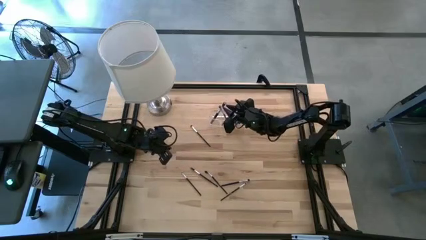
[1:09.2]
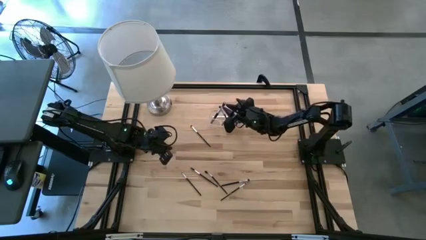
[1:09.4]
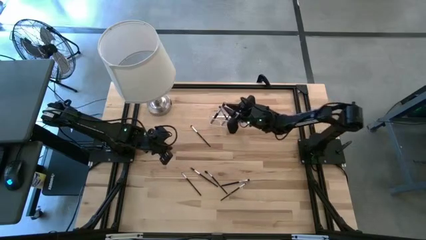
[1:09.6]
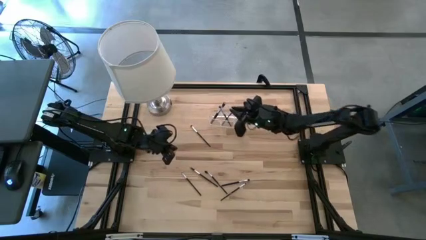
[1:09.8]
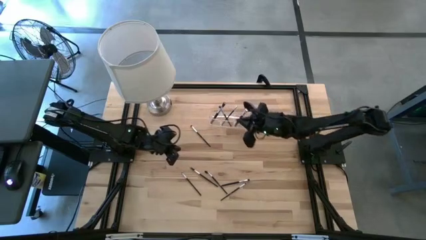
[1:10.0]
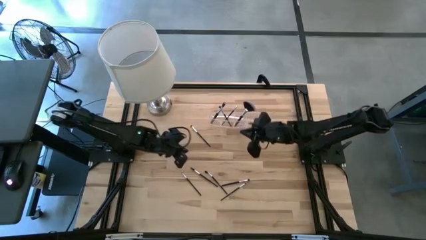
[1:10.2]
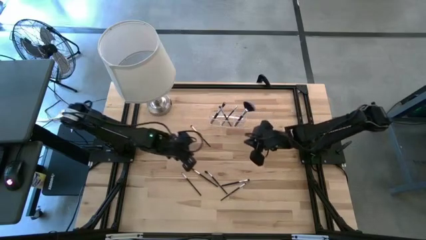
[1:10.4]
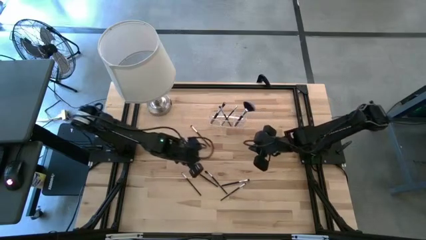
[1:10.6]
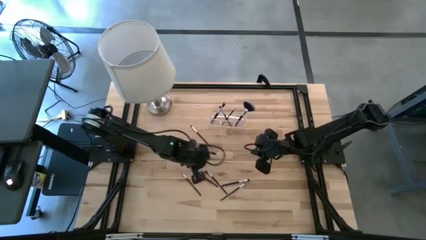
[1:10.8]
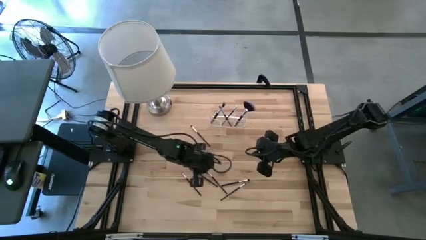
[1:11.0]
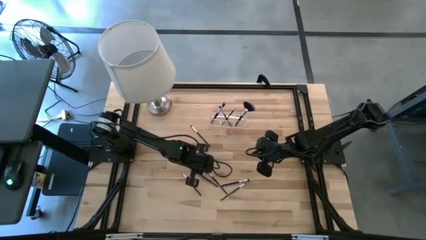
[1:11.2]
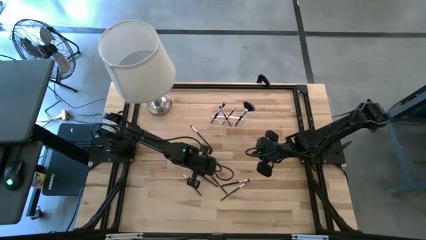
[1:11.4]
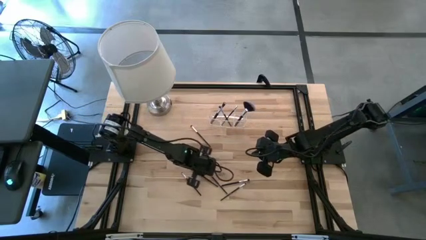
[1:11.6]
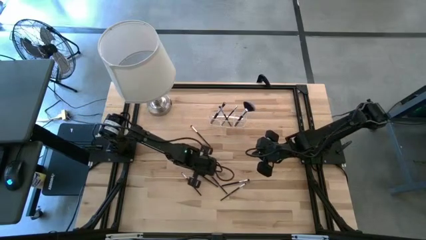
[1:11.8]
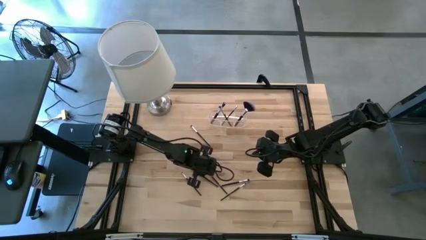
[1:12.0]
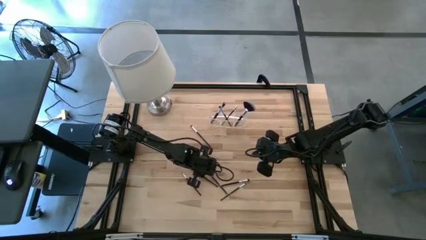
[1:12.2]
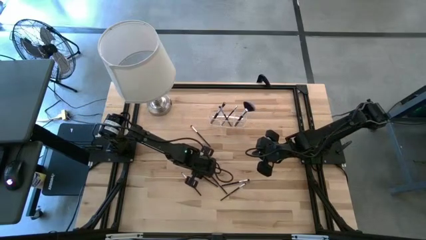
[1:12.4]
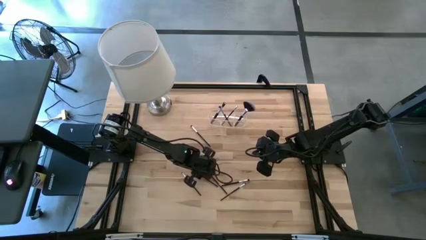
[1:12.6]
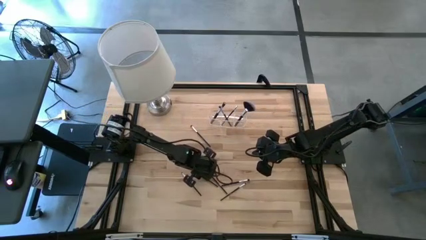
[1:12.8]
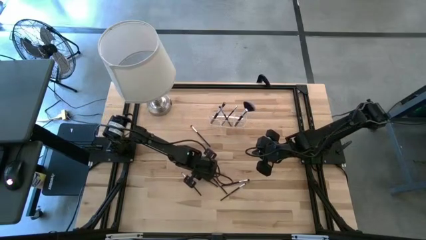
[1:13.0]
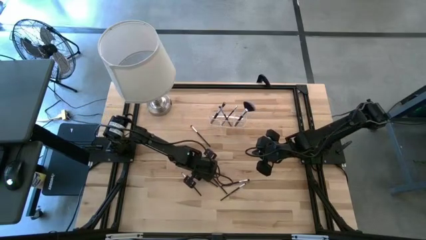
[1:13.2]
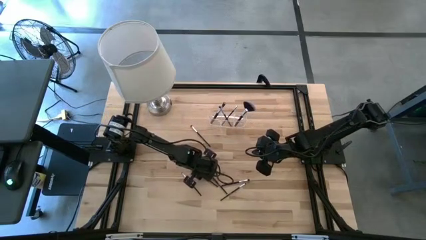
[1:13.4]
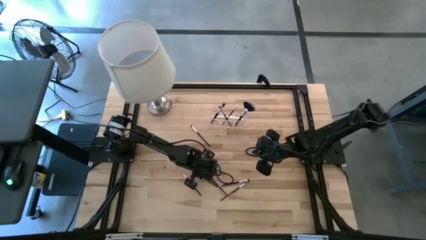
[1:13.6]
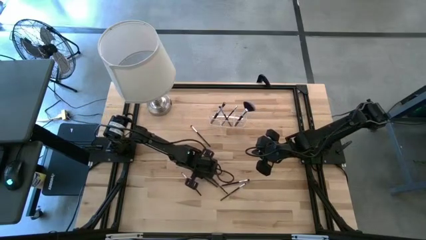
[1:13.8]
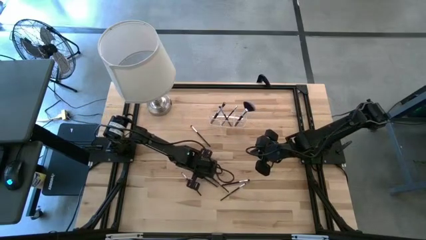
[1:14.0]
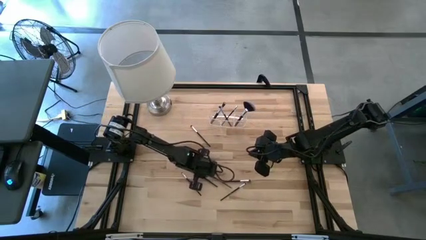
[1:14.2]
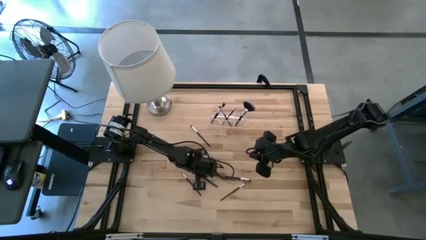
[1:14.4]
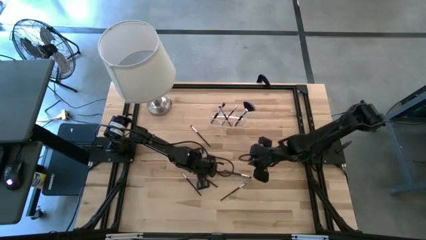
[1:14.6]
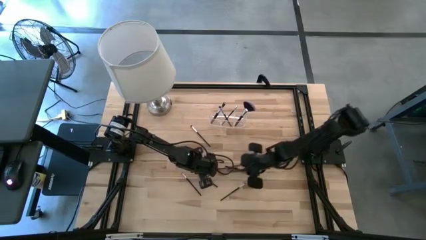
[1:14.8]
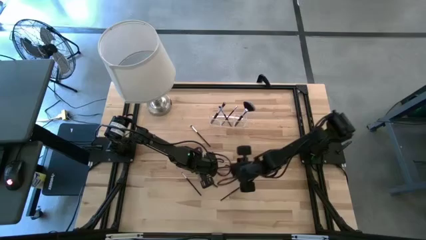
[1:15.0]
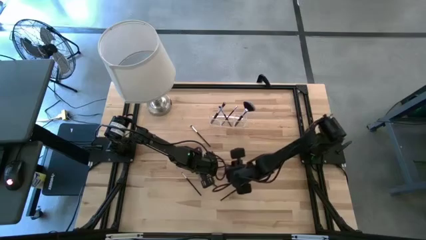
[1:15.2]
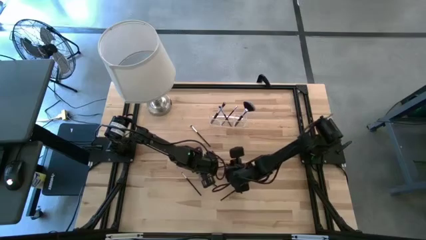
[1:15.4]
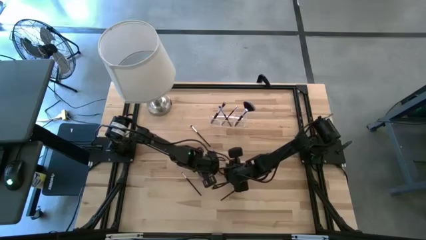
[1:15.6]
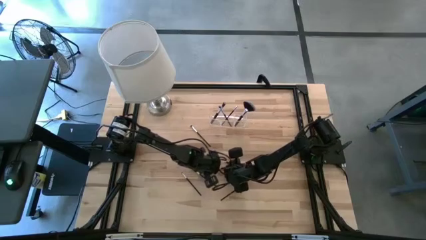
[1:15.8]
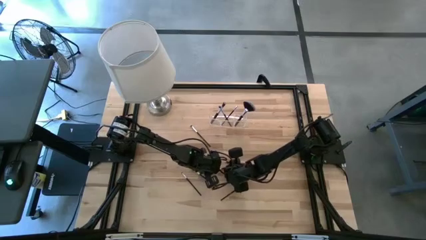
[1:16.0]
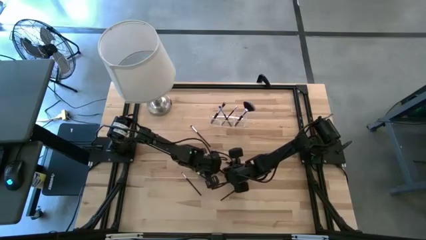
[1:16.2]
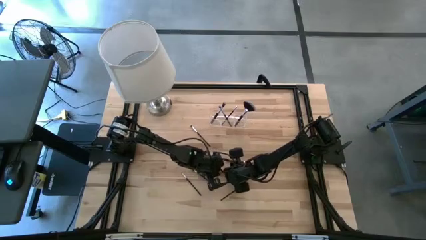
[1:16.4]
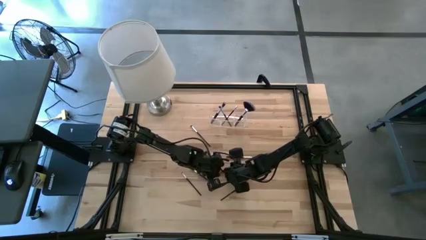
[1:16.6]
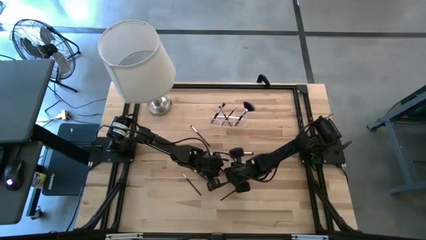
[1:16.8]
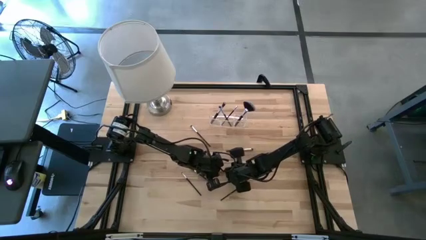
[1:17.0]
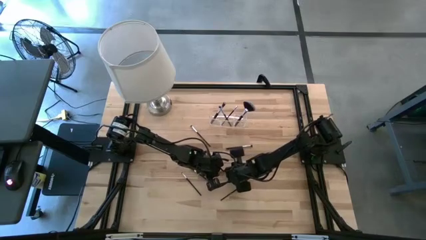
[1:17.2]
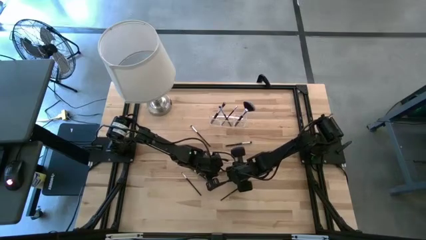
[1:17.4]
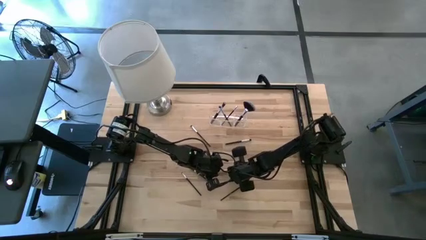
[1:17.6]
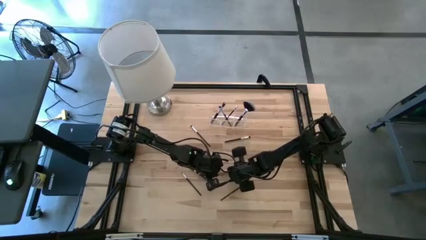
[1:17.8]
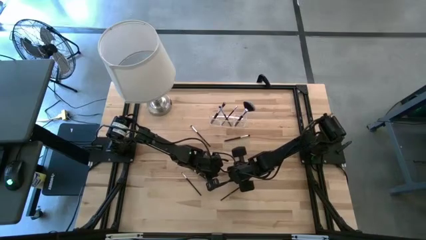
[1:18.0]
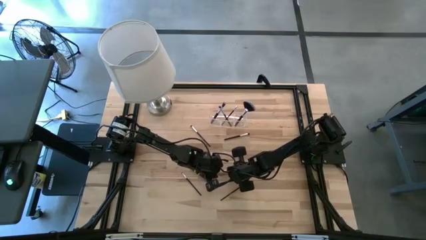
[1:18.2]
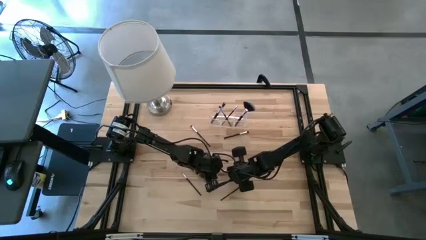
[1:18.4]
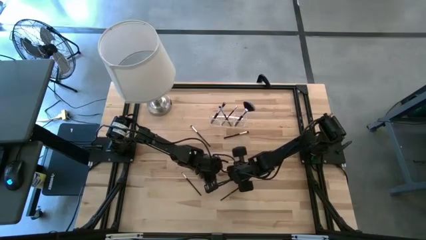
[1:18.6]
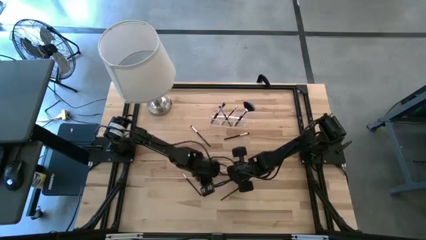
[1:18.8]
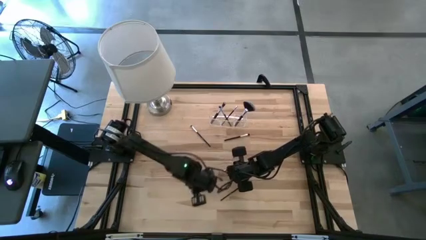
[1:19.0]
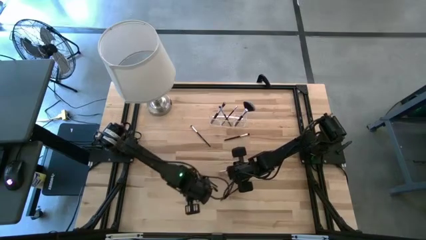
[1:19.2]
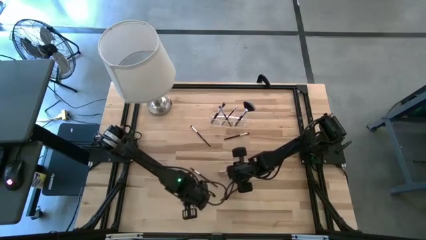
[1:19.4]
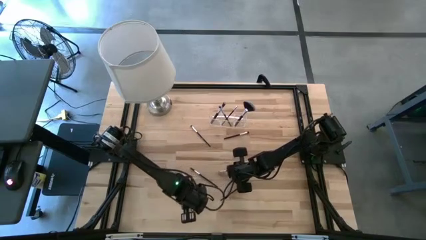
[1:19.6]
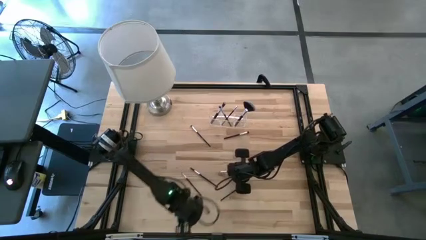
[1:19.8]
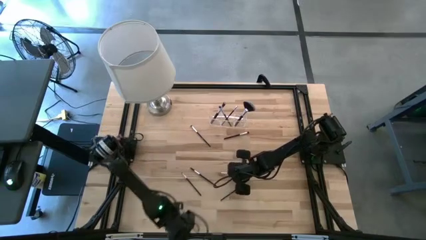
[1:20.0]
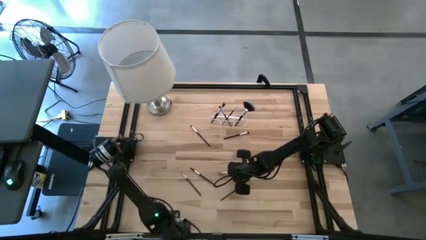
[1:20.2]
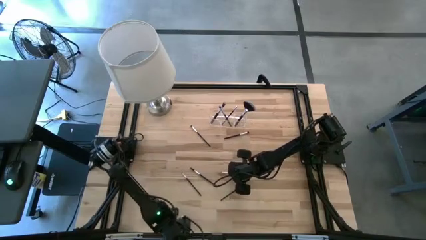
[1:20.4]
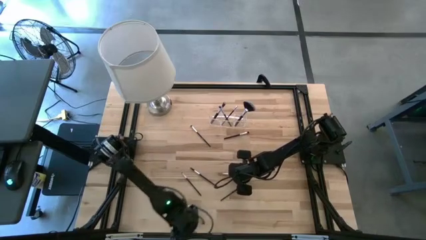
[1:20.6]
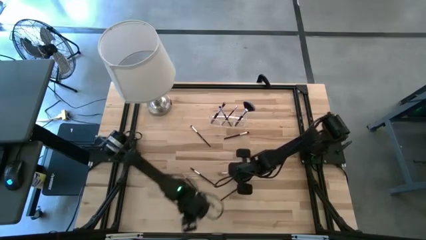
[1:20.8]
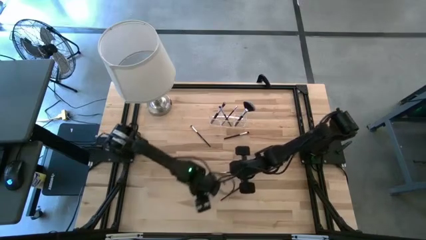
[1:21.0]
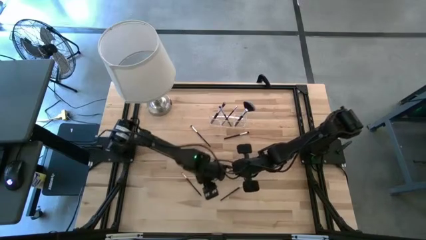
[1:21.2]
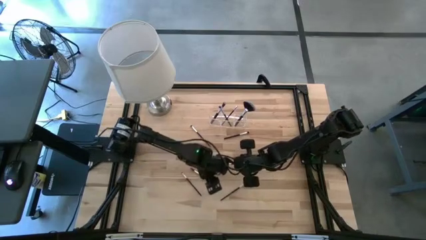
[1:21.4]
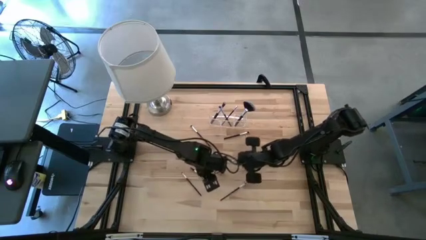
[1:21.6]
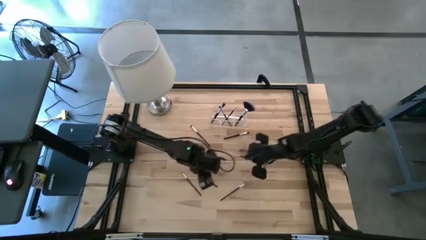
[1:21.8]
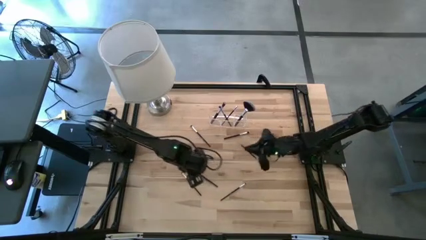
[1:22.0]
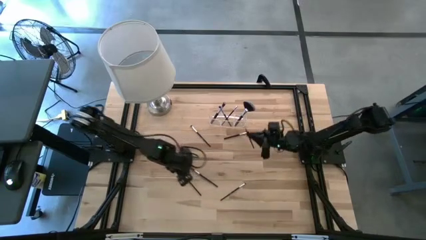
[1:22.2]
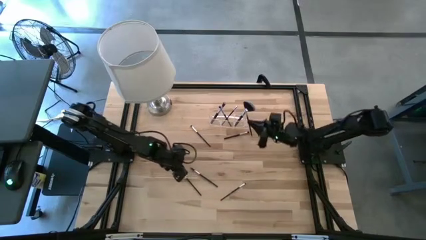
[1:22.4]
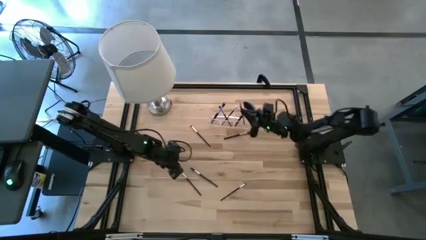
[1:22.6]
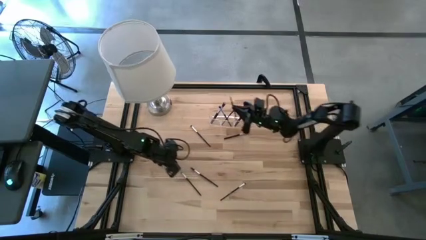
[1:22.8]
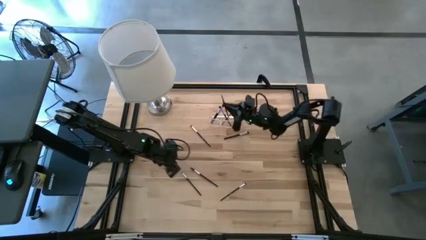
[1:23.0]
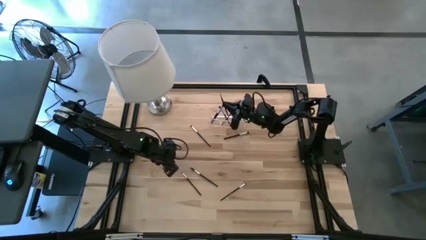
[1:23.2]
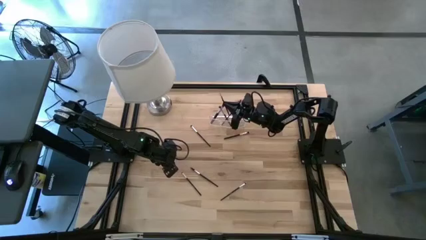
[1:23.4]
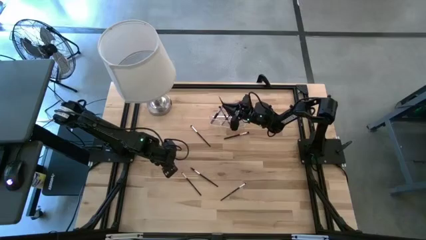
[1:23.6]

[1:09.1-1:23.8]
Task: Put items in baskets/containers
Put the liner brush into the transparent organizer

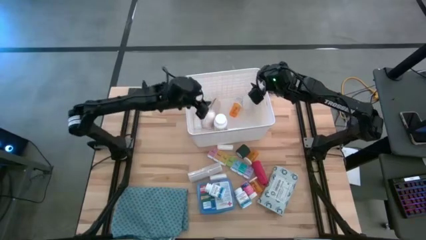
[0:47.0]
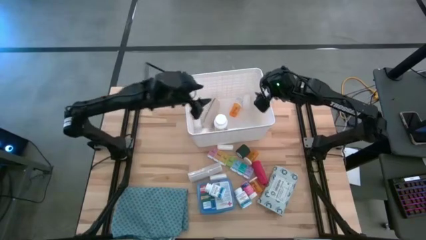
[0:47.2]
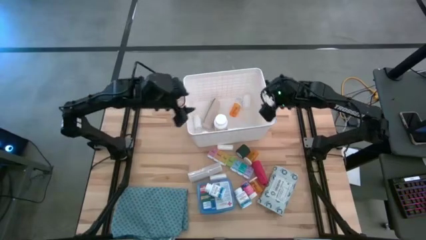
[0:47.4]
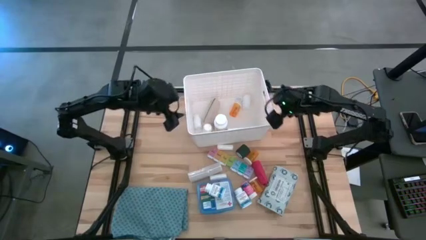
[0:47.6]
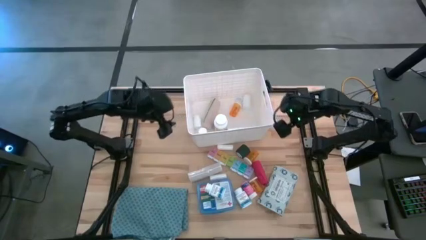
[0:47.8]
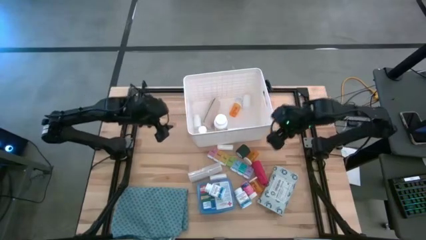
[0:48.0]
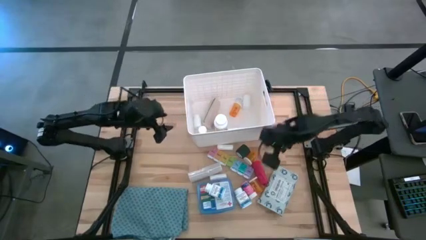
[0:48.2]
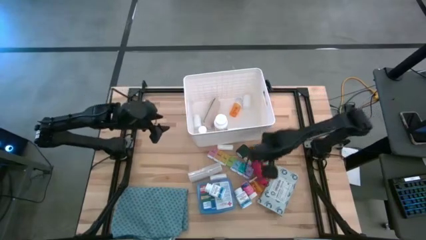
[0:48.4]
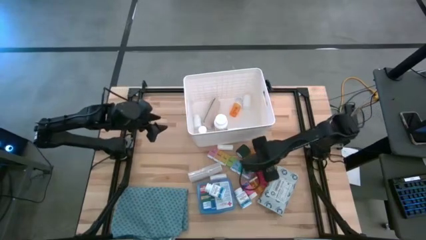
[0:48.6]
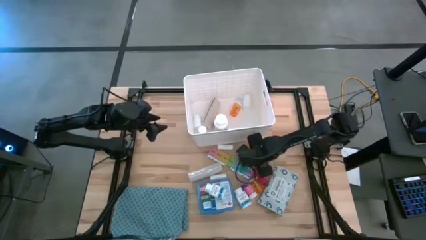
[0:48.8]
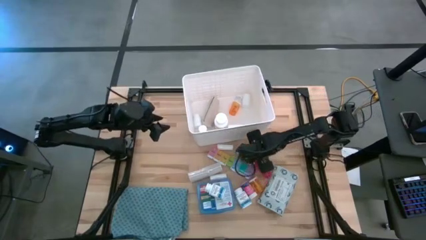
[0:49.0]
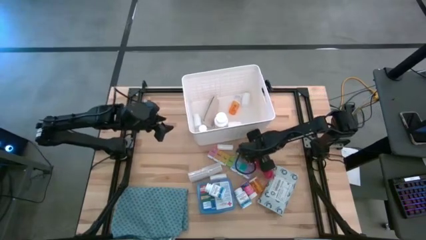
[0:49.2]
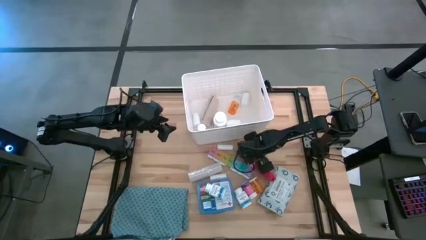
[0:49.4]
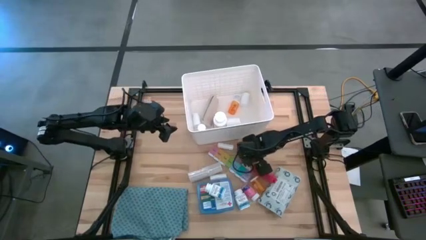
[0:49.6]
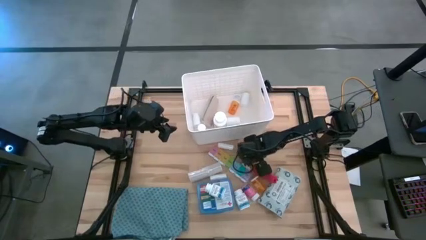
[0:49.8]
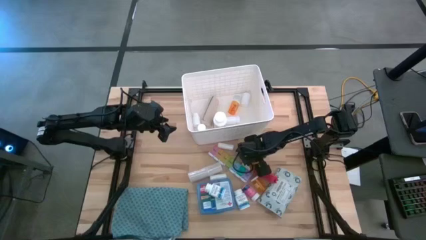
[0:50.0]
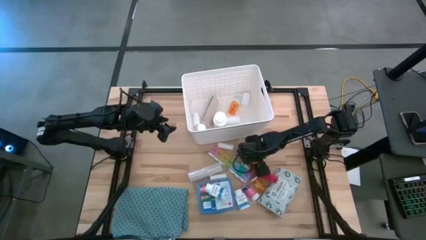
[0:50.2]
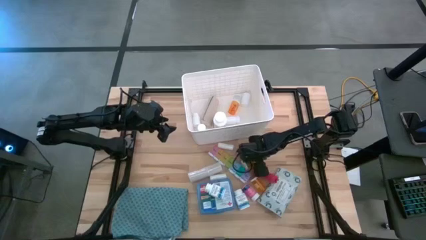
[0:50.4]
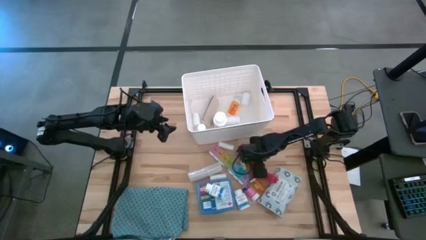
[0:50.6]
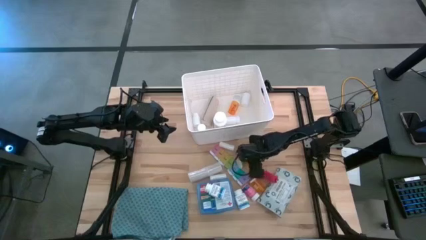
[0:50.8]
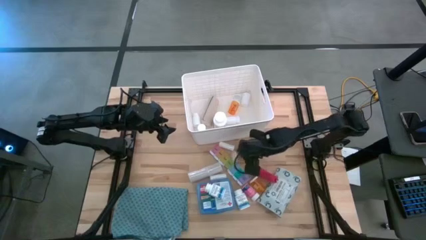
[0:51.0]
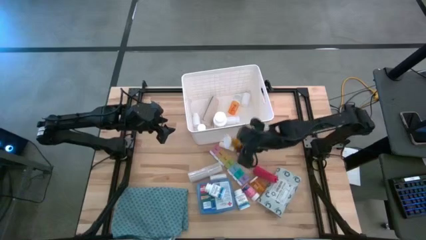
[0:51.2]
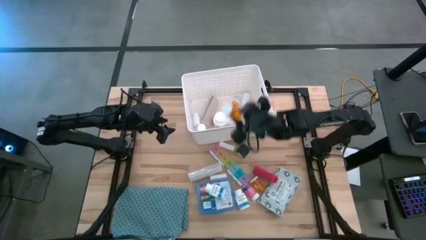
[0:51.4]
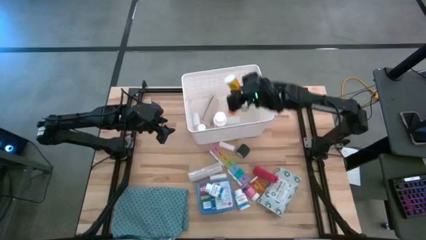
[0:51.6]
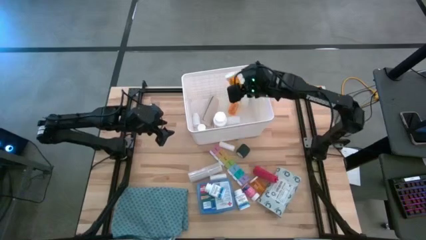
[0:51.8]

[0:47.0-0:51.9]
Task: Pick & place medical supplies in basket/bin
Put the orange medicine bottle into the bin
